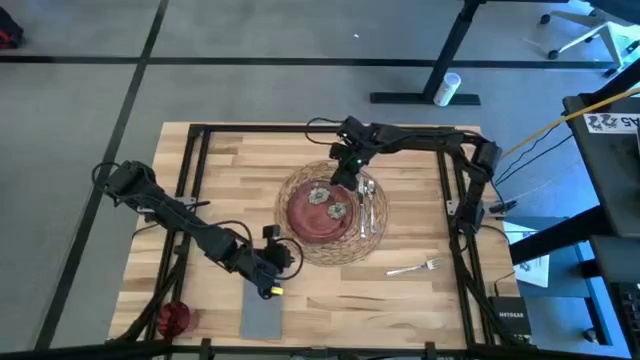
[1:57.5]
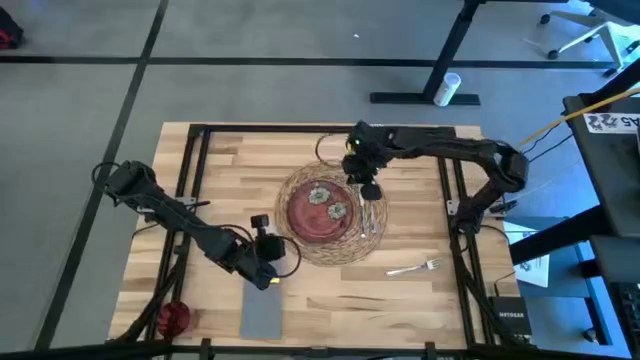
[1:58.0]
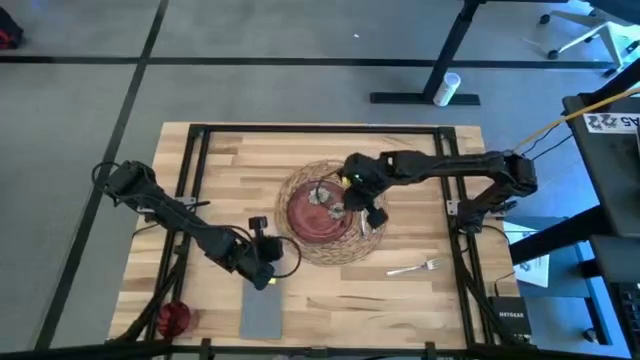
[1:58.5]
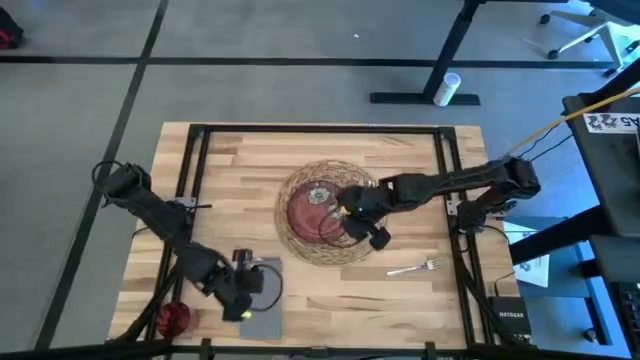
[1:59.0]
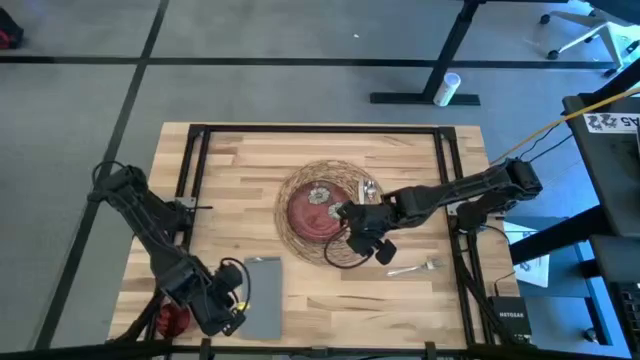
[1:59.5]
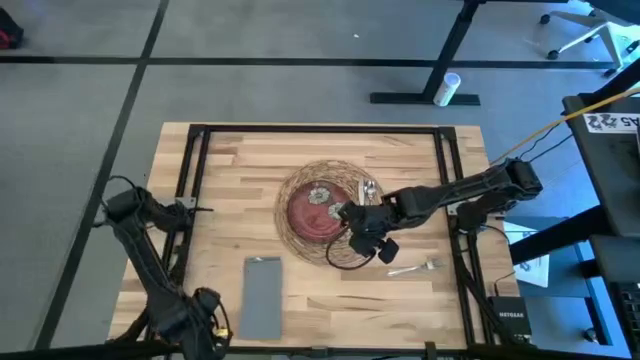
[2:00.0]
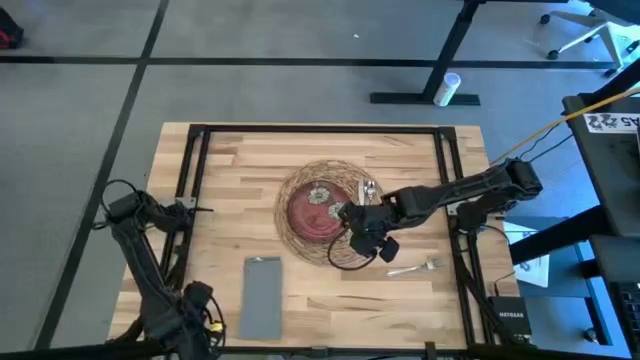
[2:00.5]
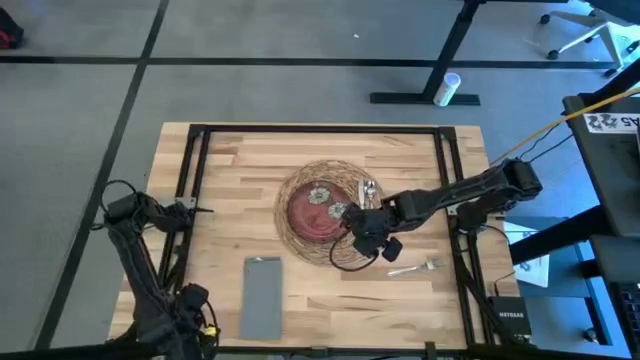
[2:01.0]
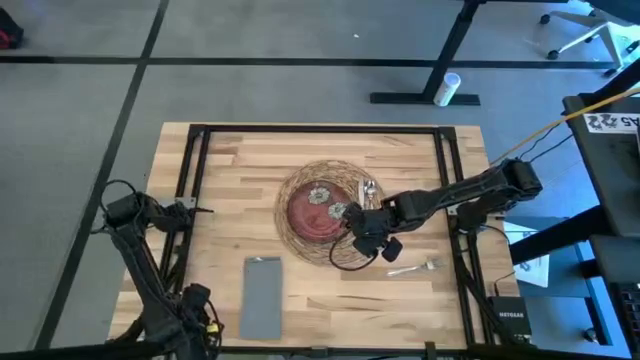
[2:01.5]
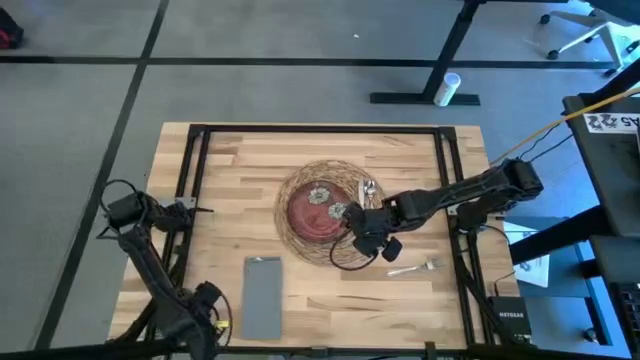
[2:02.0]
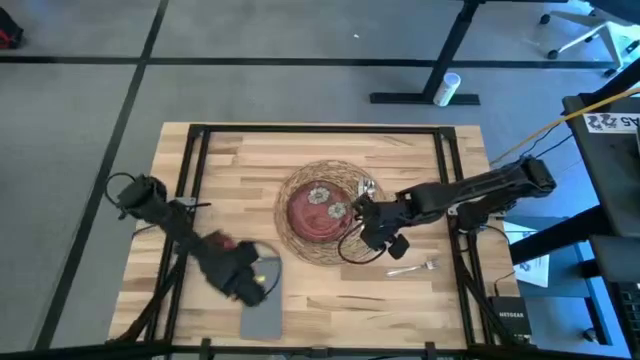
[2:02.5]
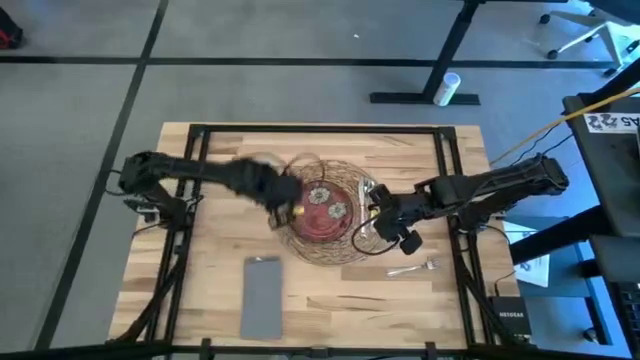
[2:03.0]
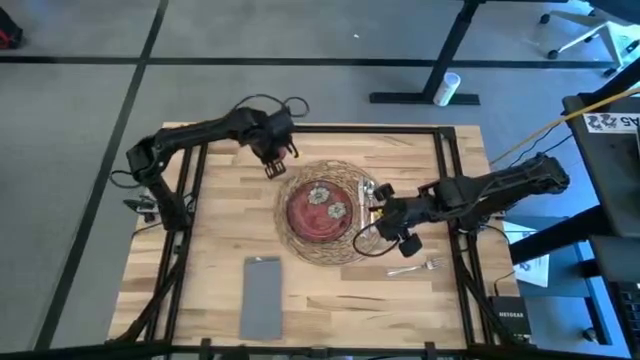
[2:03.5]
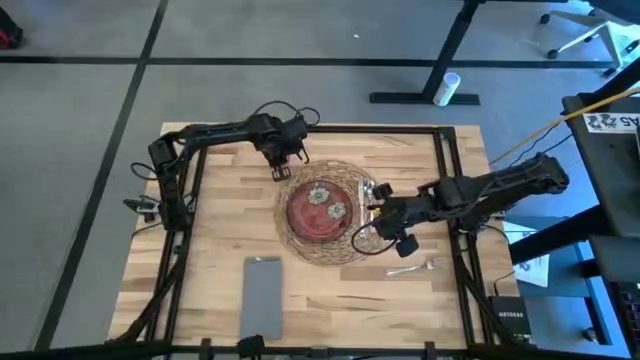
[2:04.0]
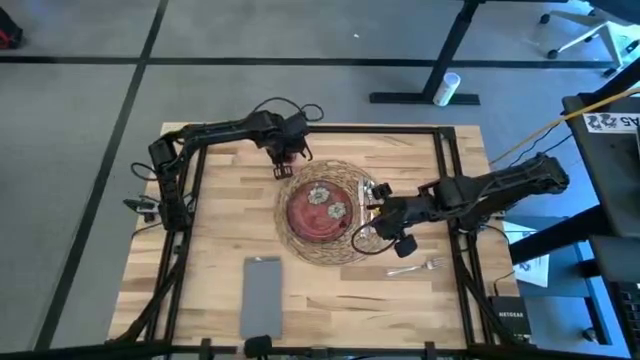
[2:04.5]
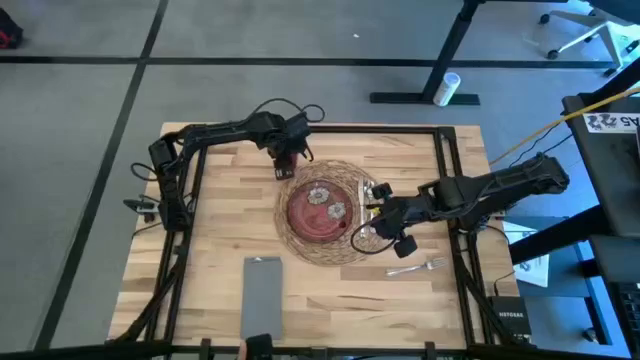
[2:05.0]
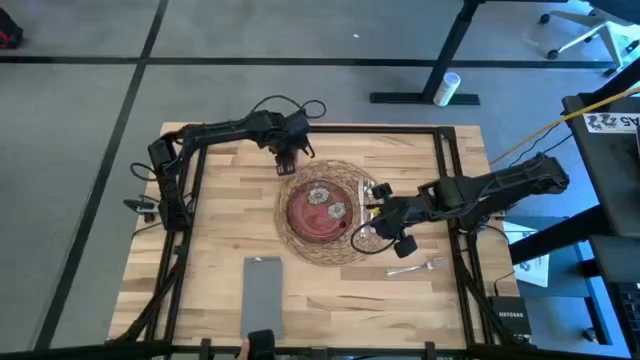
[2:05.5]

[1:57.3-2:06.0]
Task: Set table place
Move the red cup to the top of the brown placemat

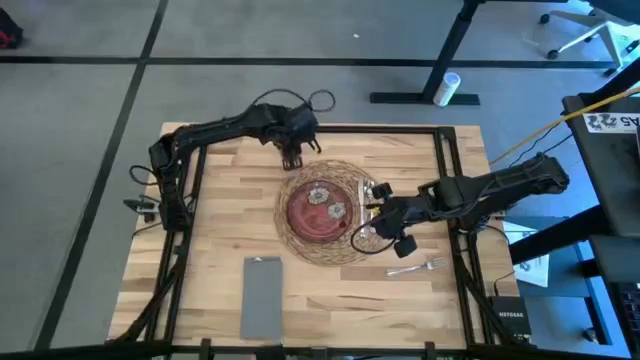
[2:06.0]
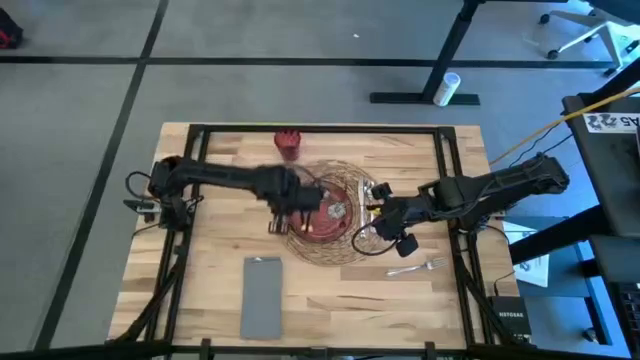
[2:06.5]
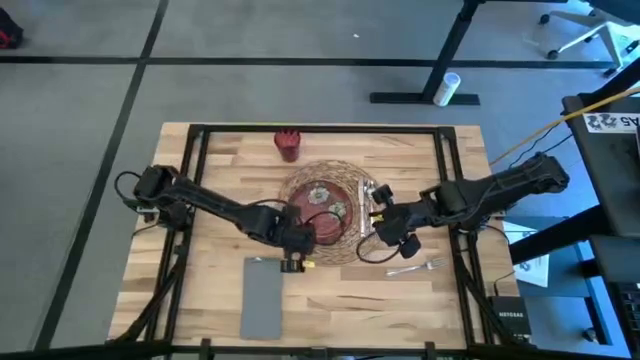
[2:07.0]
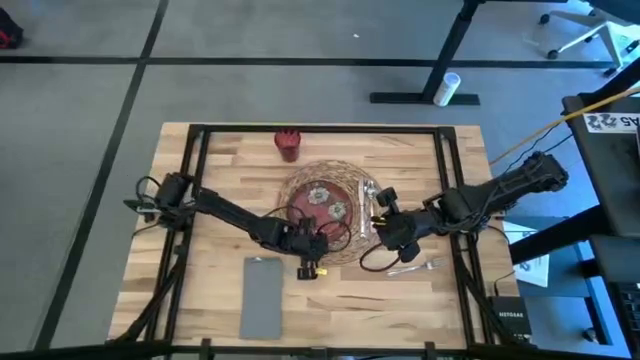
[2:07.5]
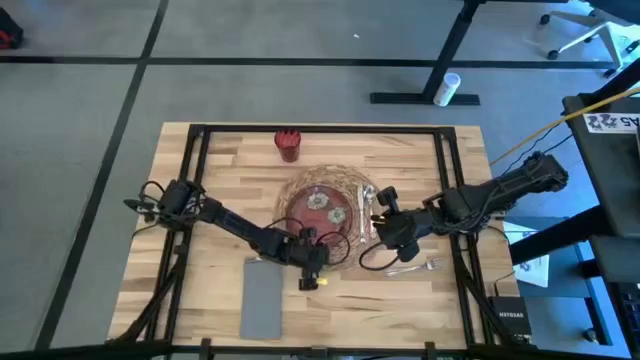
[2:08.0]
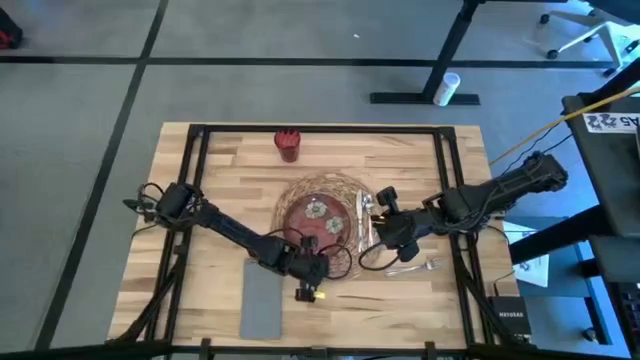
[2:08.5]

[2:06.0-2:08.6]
Adjust the brown placemat

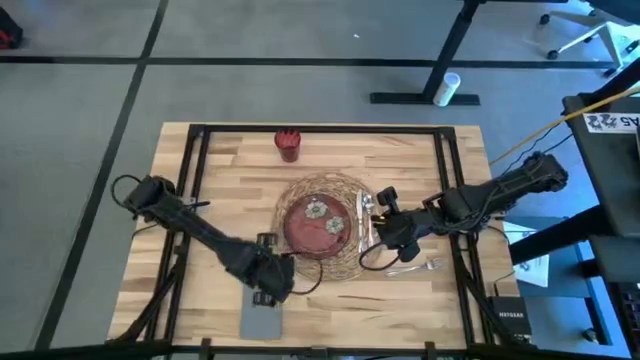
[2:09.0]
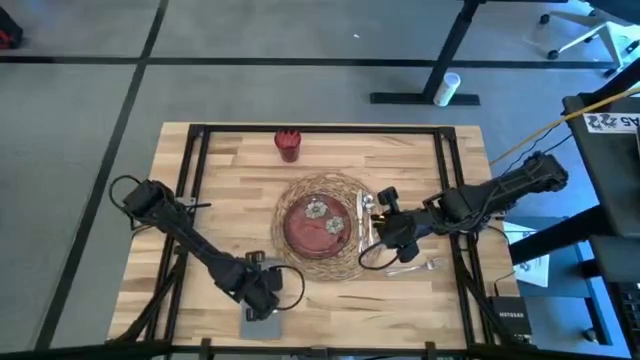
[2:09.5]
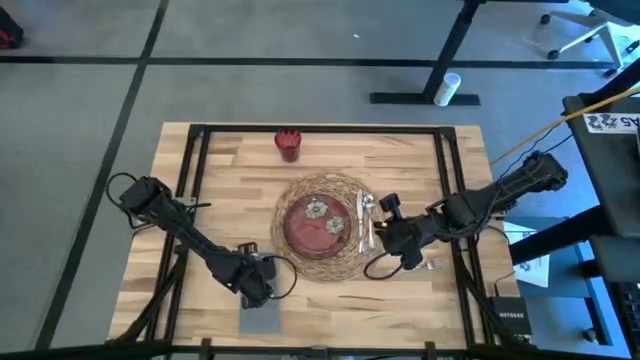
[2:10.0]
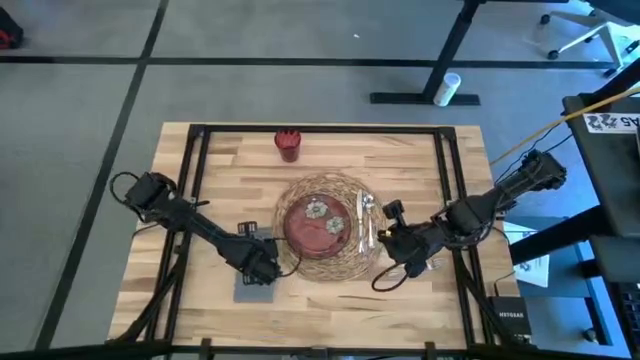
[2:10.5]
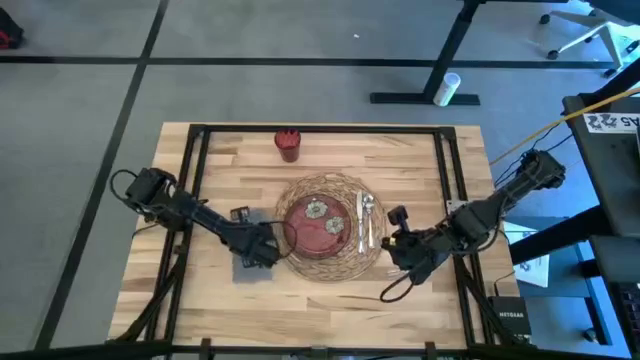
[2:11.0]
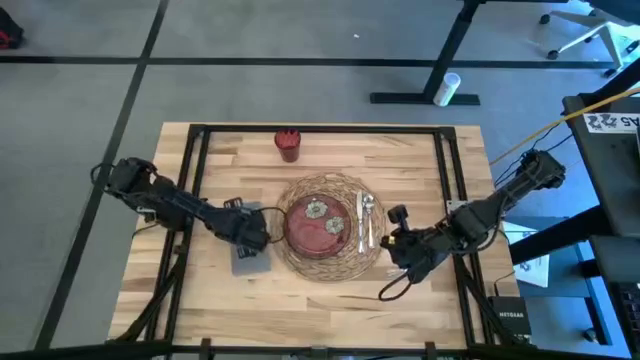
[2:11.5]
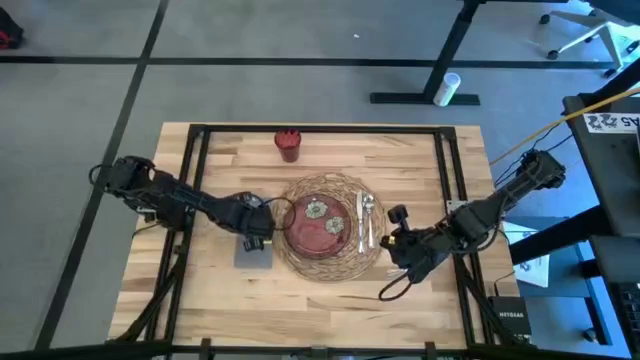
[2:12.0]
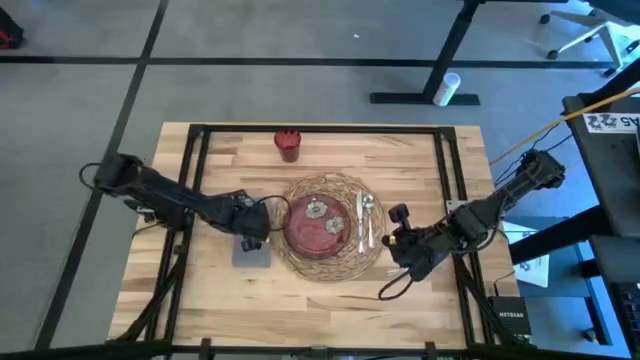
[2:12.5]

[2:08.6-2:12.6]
Move the gray table napkin to the left of the brown placemat

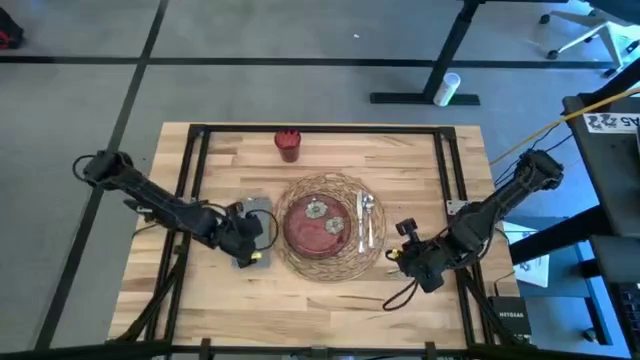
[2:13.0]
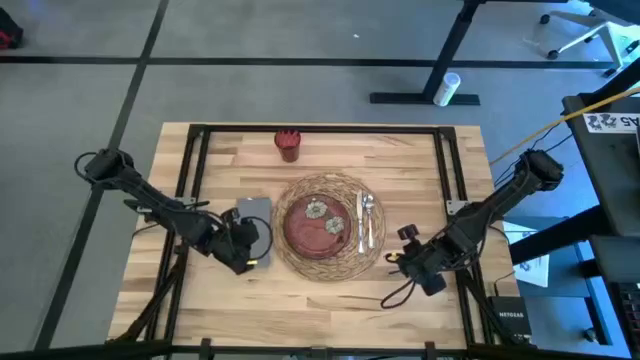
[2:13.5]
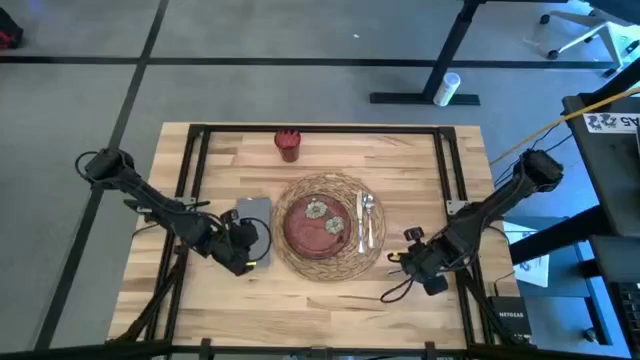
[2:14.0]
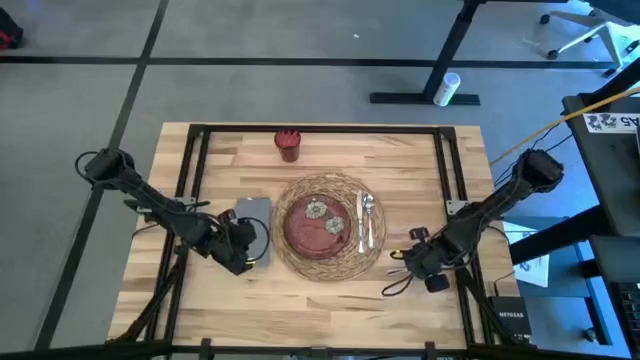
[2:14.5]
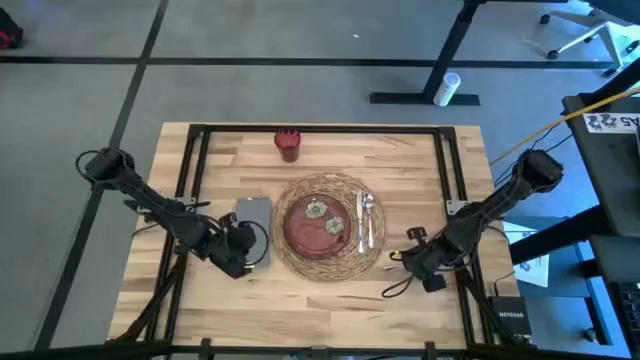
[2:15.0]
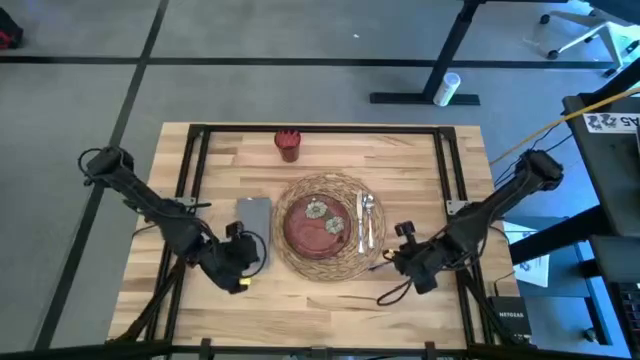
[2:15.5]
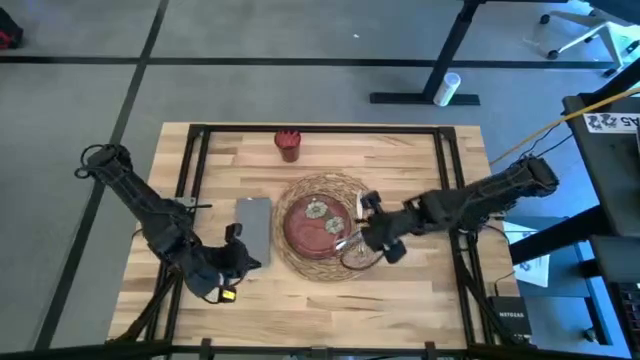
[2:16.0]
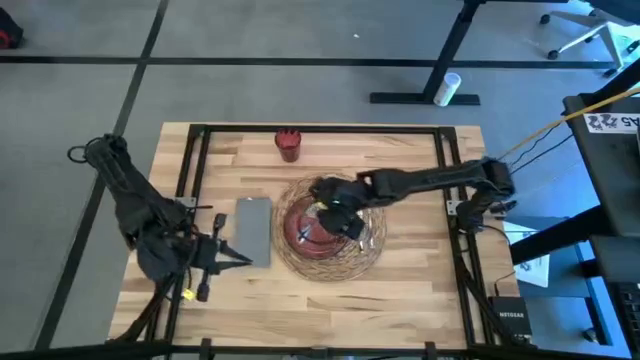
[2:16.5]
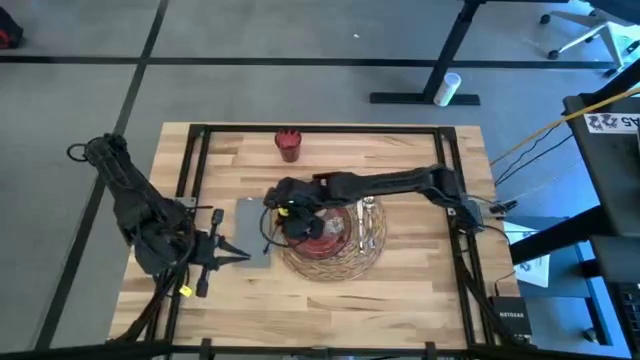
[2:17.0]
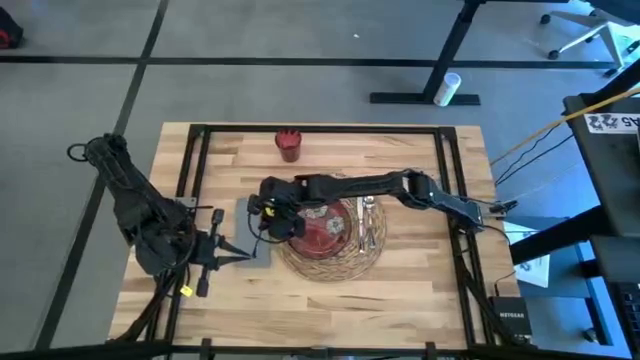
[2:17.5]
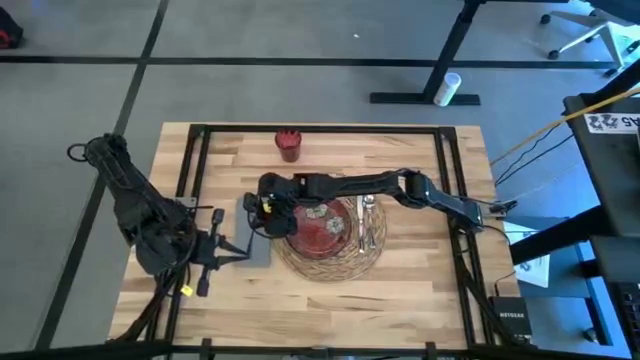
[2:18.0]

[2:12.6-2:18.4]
Put the silver fork on the gray table napkin
